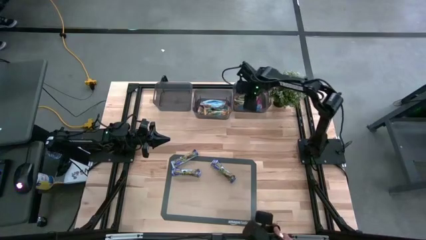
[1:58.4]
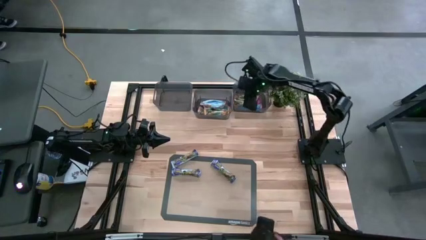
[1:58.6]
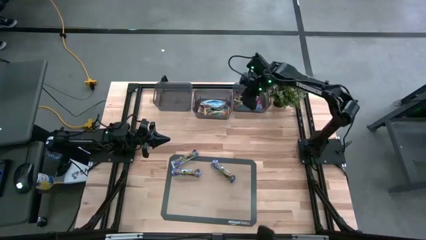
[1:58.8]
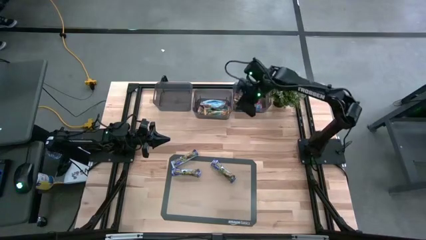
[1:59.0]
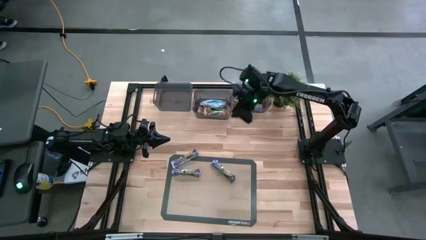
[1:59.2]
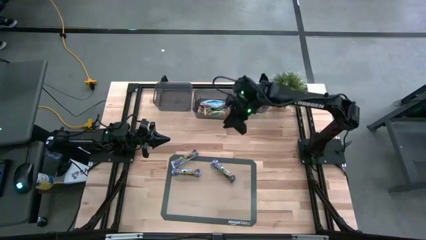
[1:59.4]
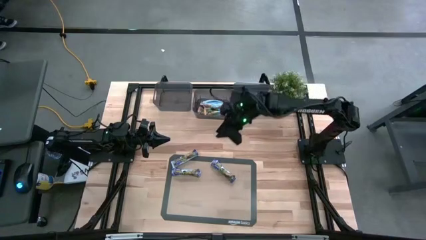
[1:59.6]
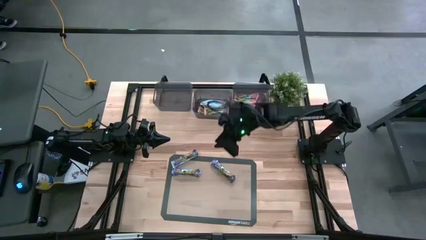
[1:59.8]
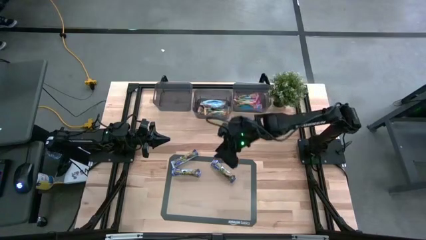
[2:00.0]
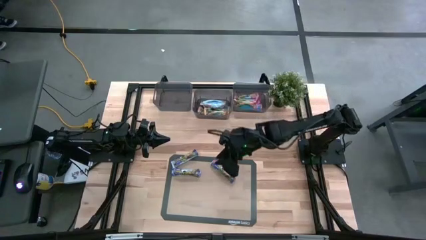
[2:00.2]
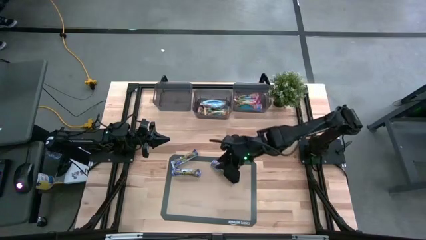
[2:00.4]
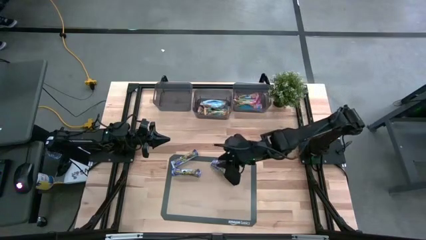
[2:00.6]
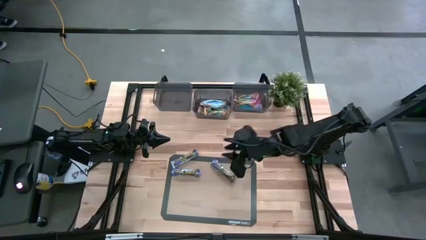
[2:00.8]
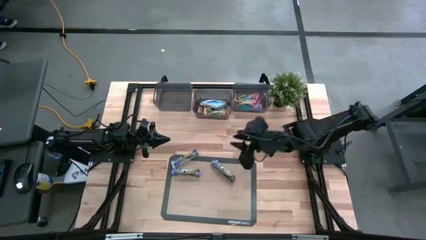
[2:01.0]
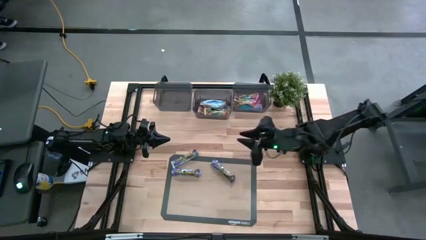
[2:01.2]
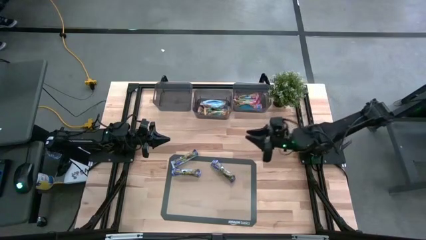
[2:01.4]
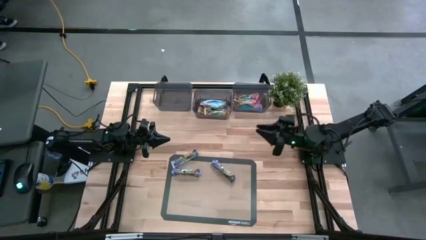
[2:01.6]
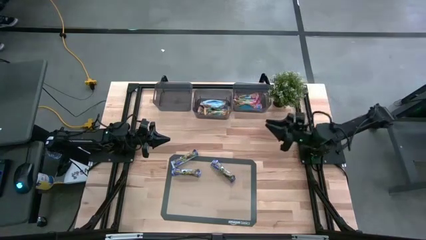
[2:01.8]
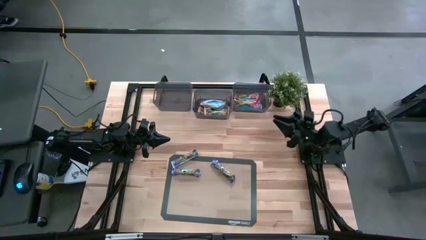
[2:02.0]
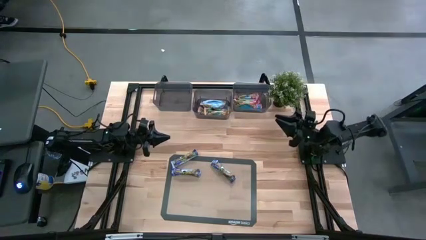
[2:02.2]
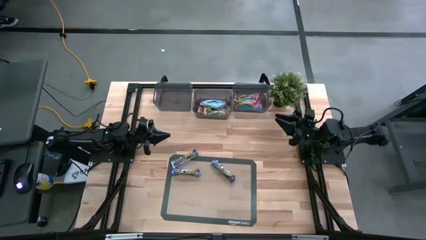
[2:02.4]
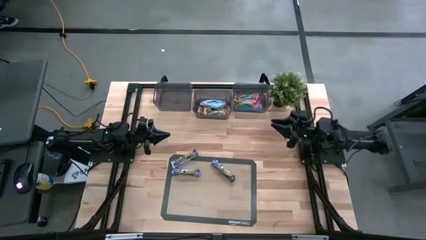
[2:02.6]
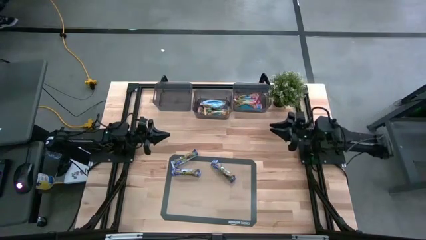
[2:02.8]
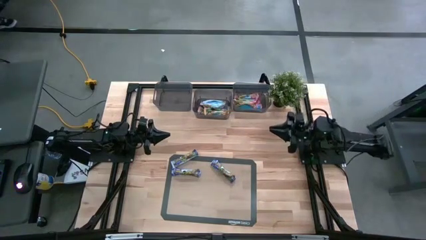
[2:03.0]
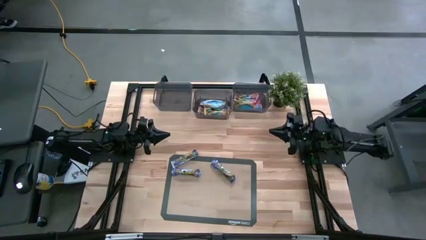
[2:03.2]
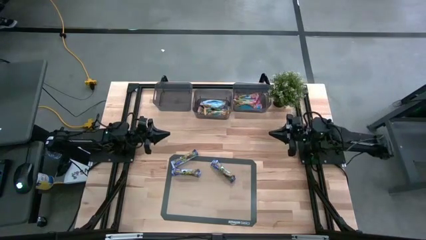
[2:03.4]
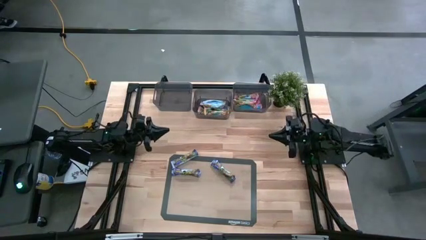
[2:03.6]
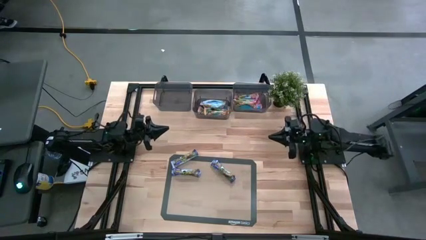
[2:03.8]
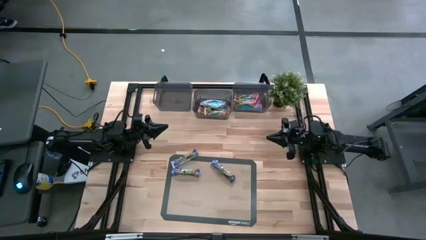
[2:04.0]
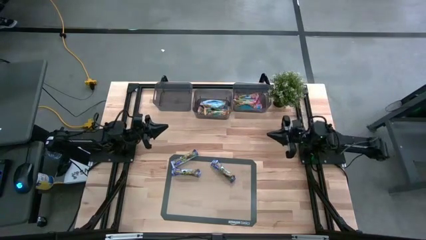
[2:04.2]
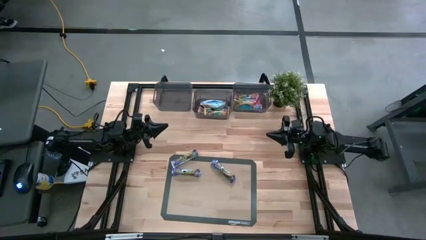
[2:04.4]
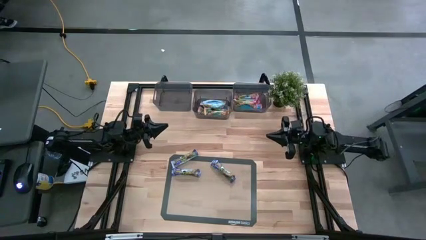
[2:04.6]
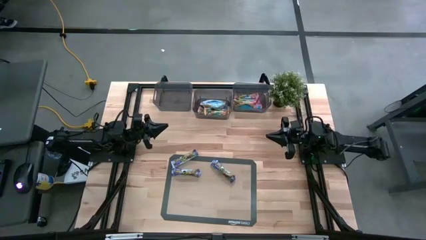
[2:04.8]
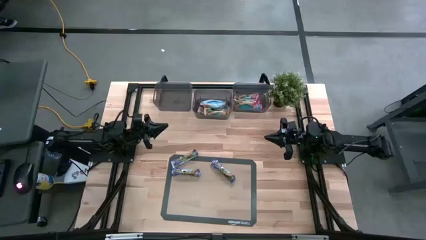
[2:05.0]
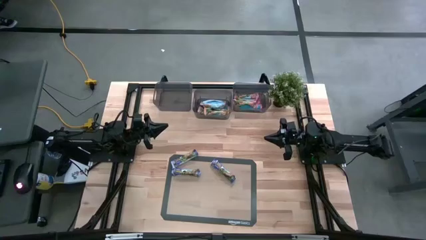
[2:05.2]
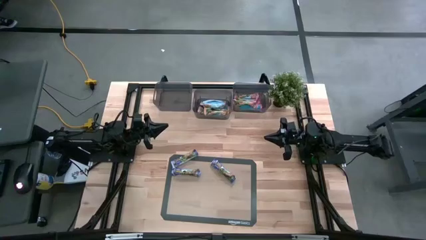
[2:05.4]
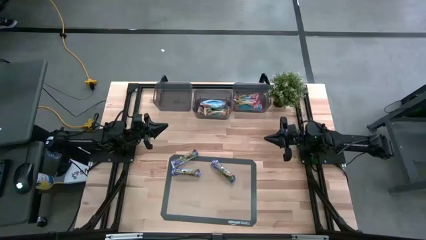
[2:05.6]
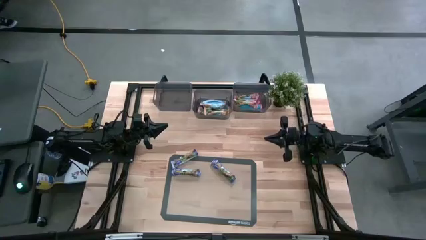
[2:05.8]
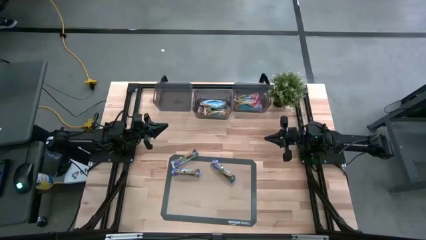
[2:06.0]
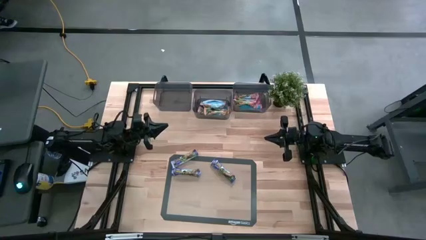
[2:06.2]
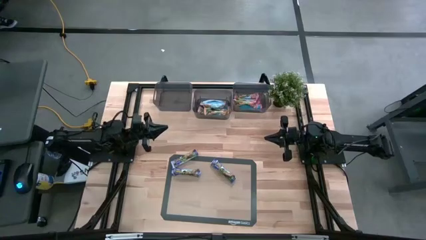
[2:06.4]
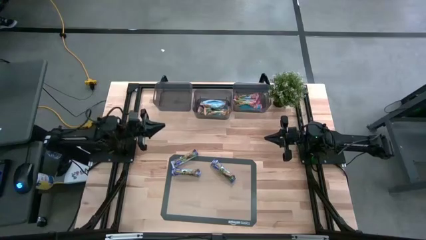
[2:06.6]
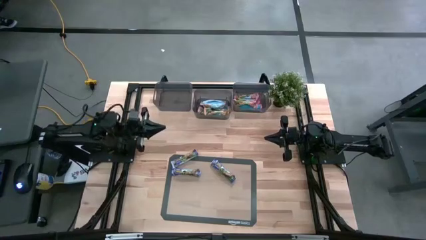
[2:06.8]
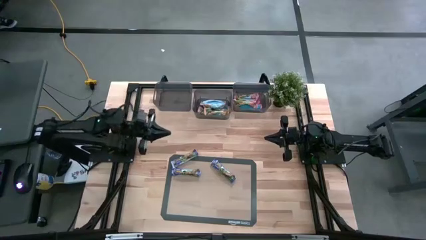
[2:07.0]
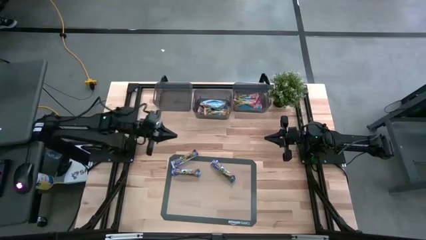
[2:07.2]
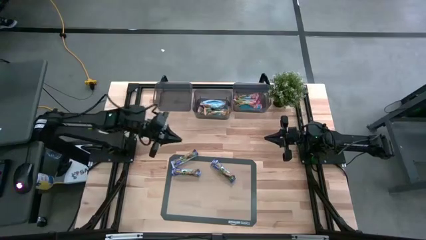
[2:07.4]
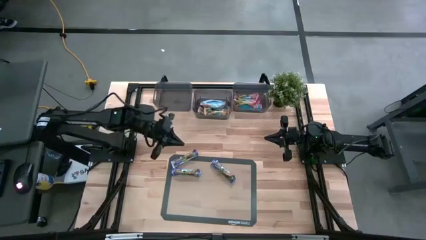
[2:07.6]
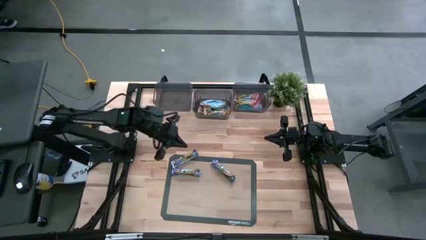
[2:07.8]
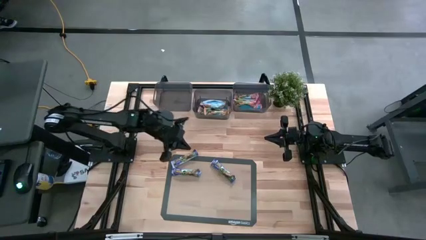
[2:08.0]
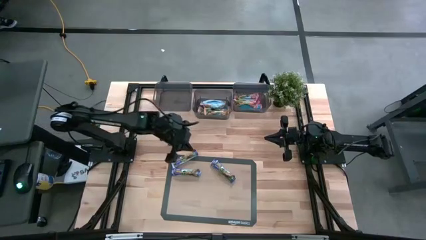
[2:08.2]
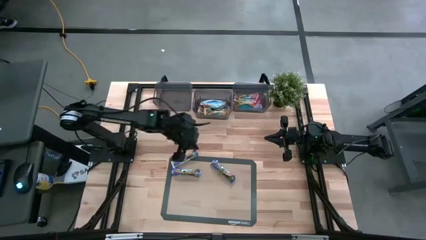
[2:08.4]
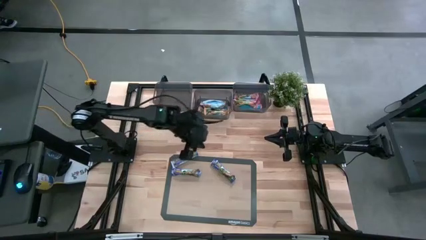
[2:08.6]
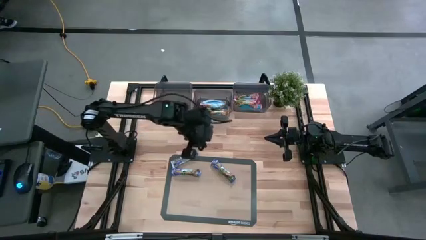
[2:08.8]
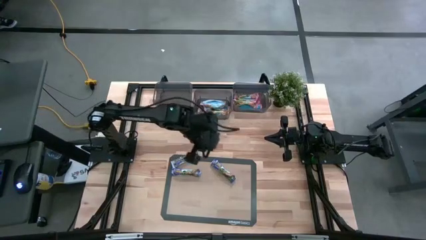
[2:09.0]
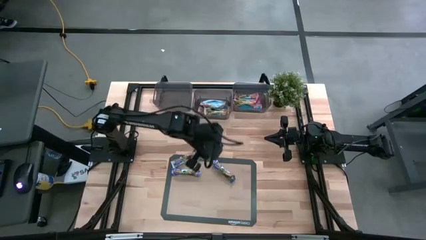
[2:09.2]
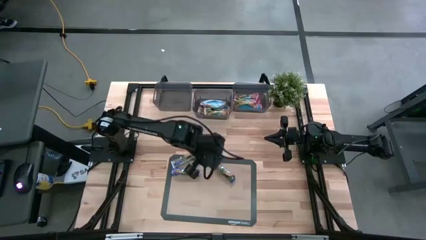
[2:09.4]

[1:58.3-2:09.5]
Task: Pick and place Granola Bars by type
Put the right blue granola bar into the left black bin

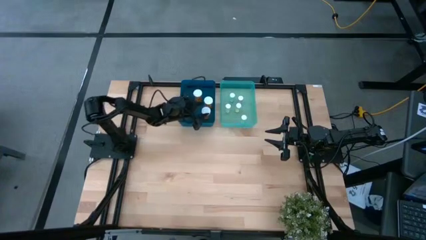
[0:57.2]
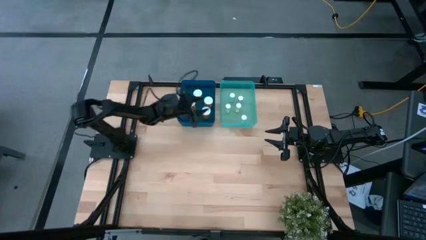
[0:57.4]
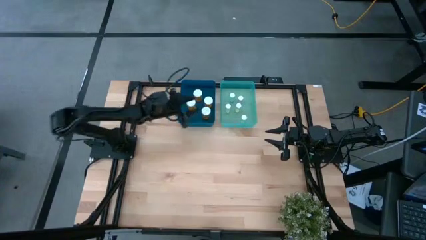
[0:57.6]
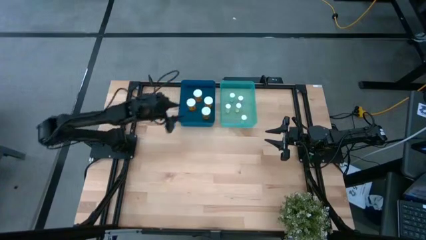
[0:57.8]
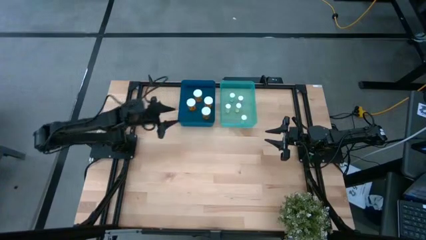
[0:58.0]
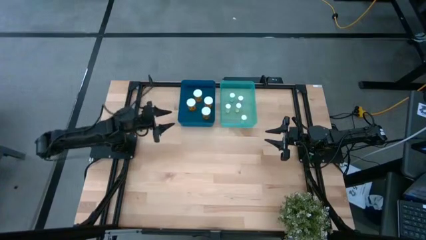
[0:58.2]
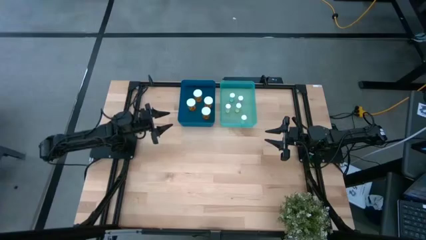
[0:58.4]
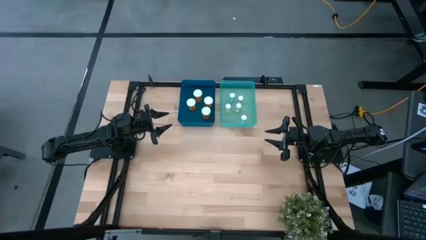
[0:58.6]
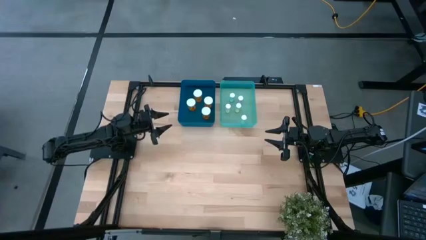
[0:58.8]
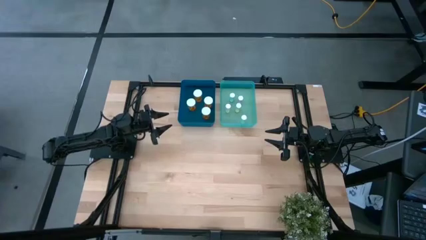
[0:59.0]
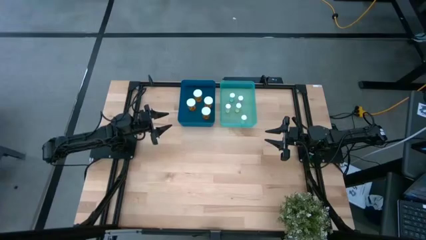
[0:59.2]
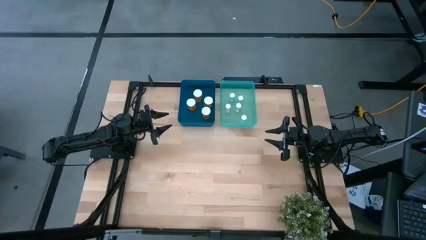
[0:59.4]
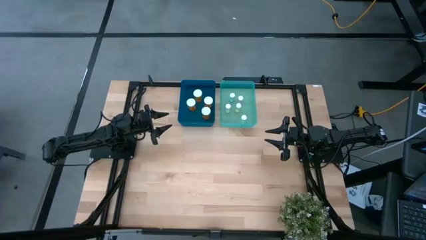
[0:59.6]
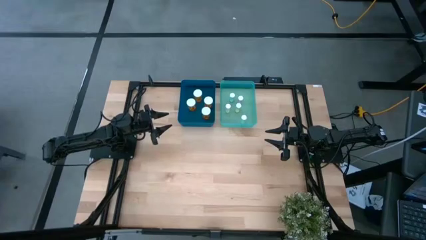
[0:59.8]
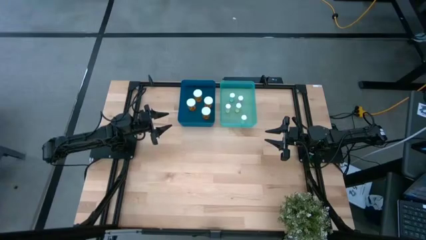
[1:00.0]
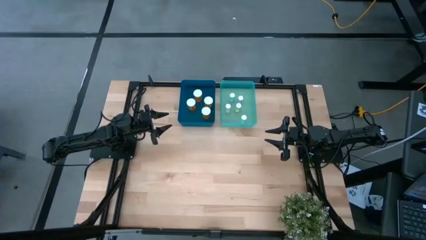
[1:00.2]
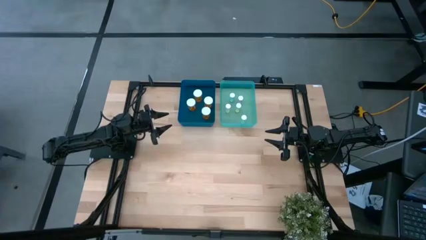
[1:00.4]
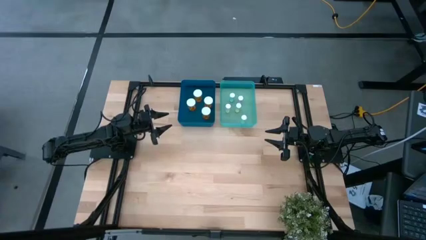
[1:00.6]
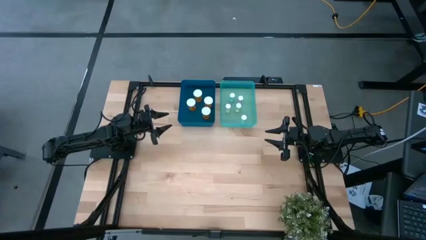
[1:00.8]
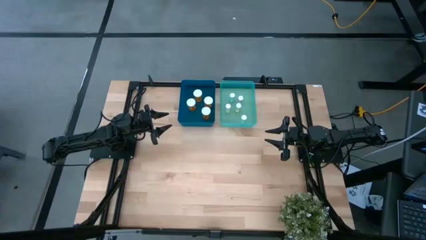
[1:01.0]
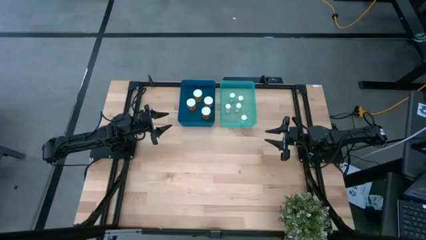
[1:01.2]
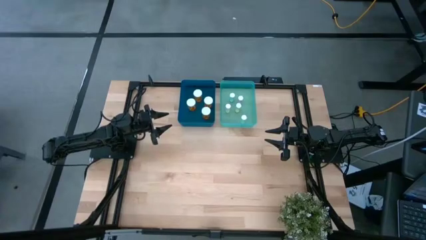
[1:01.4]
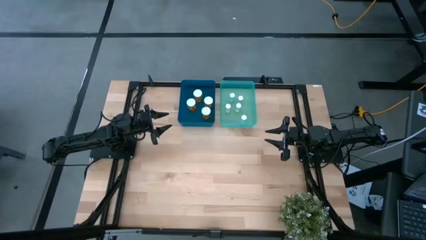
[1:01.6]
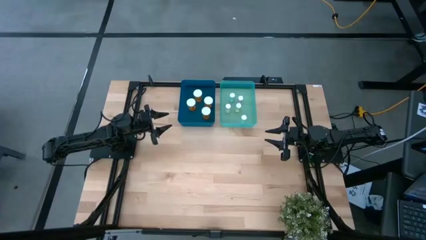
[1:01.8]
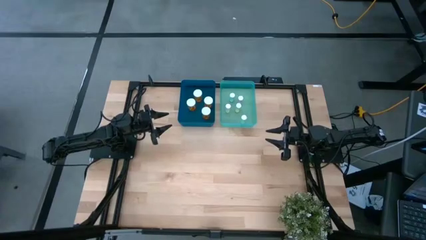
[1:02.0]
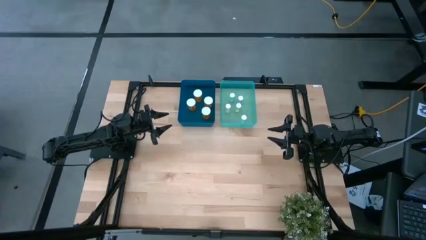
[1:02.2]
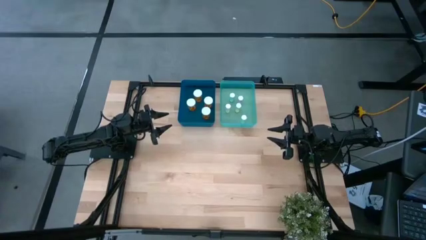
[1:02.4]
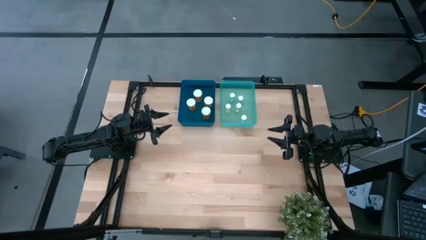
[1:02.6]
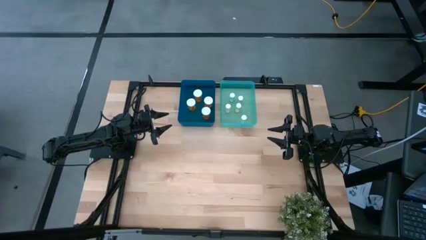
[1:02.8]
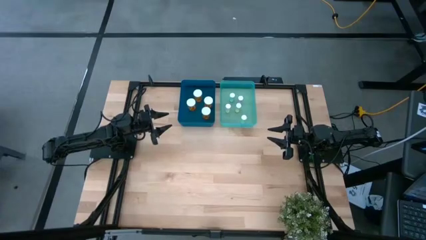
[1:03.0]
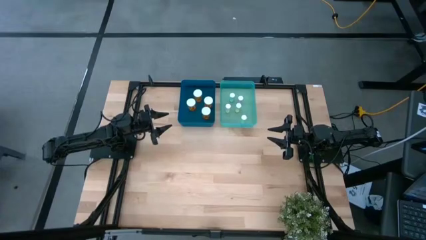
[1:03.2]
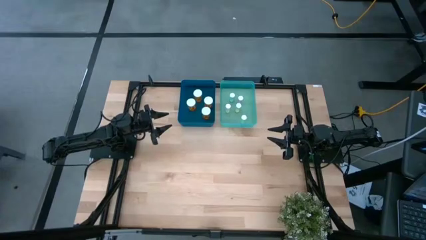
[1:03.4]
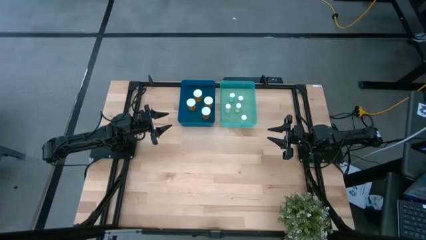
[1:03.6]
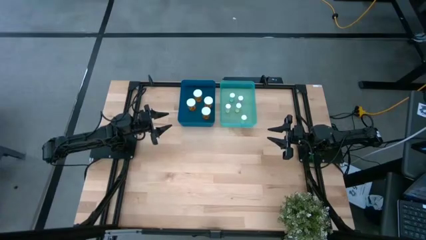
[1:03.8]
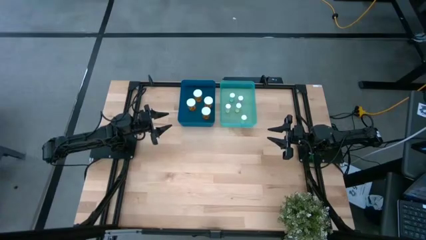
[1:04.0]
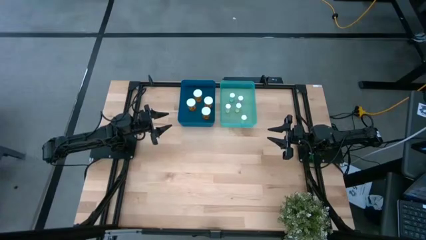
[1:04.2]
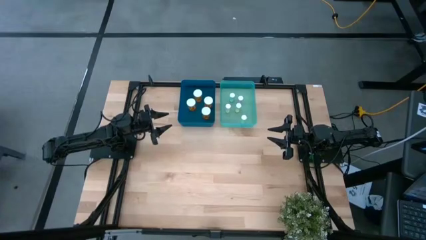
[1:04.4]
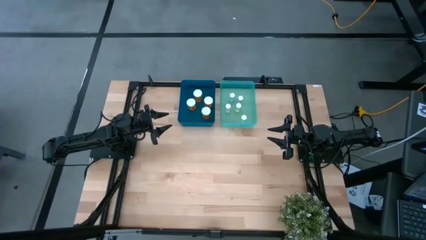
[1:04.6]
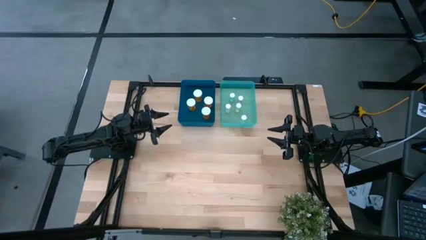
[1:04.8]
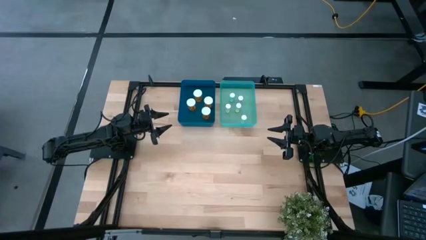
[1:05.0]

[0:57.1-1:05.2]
Task: Pick and place medicine bottles into bin by pill shape (circle, oval)
Return to Home Position
